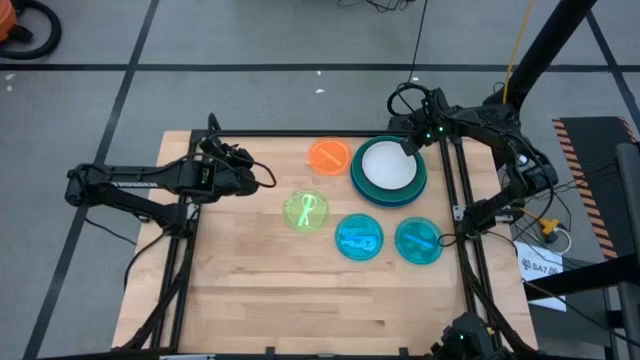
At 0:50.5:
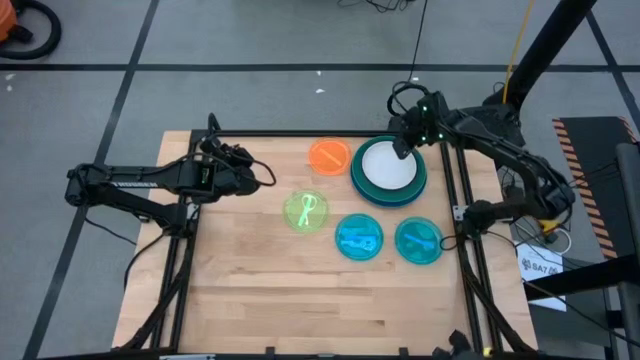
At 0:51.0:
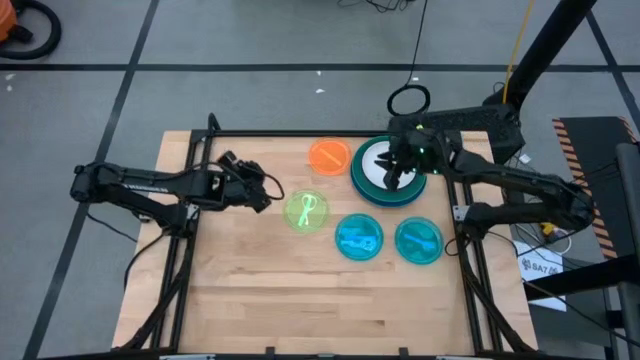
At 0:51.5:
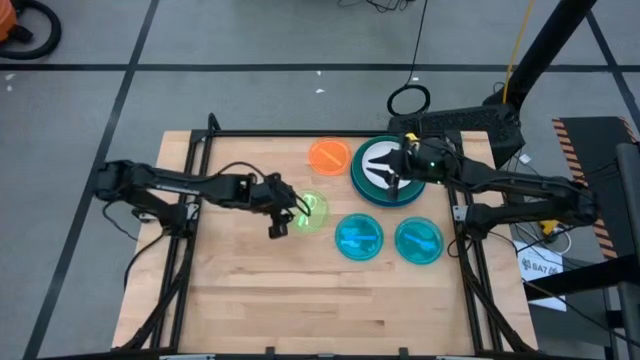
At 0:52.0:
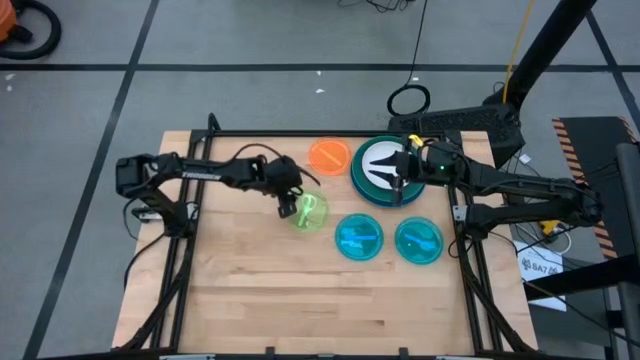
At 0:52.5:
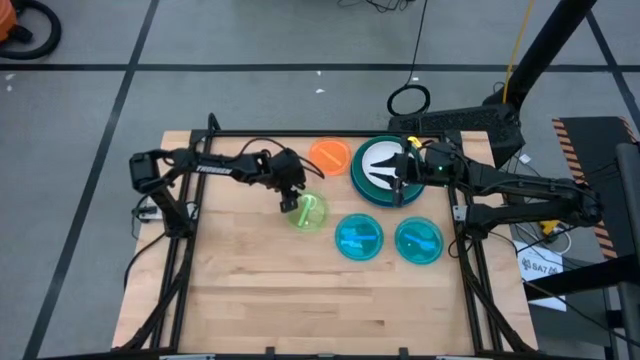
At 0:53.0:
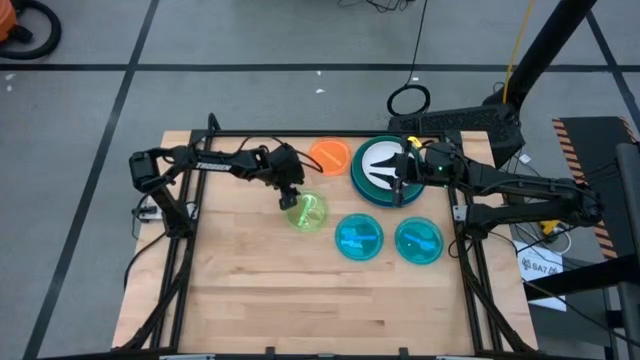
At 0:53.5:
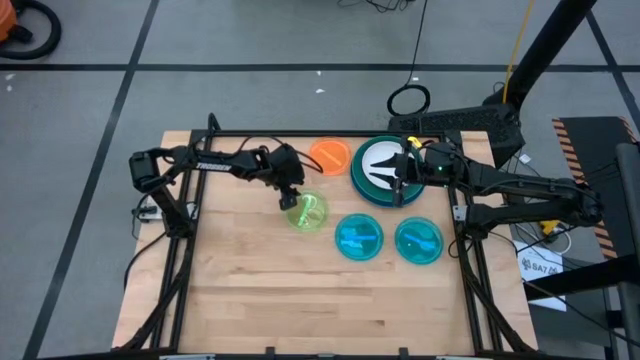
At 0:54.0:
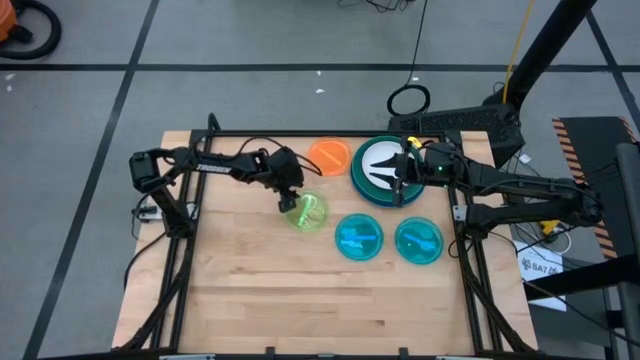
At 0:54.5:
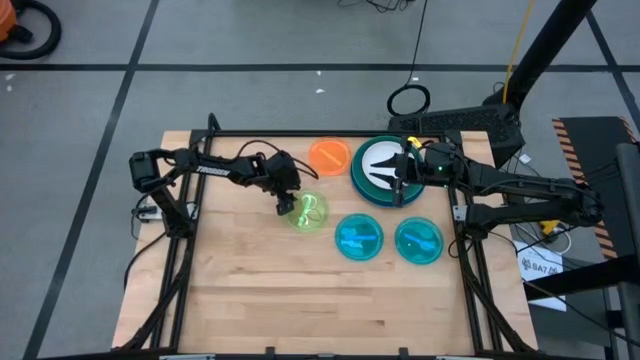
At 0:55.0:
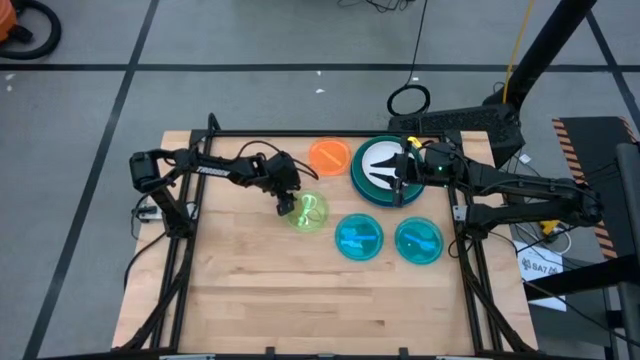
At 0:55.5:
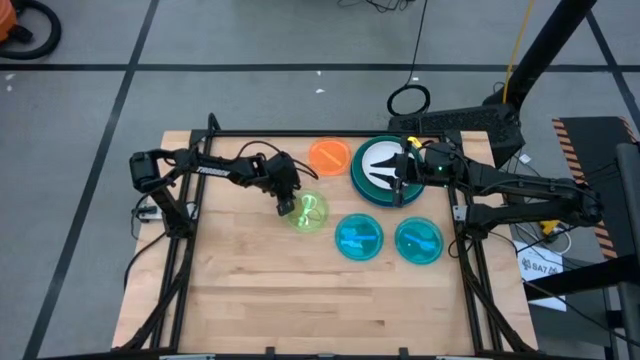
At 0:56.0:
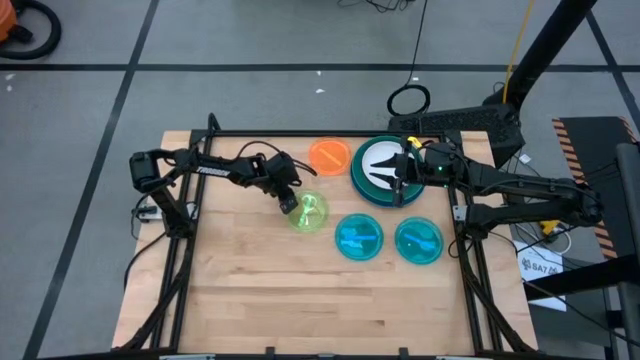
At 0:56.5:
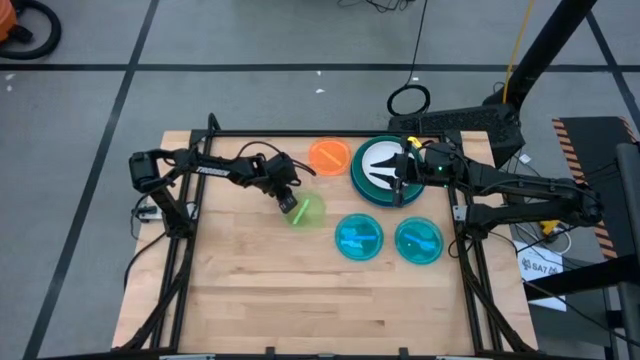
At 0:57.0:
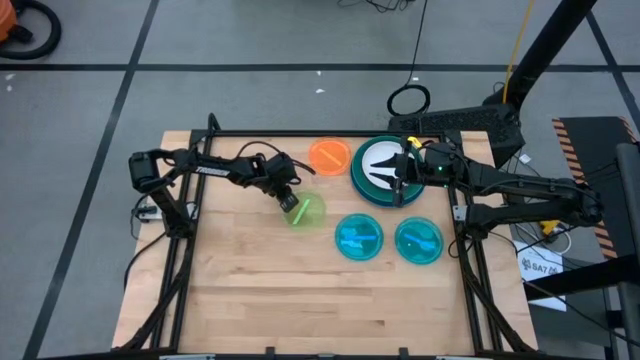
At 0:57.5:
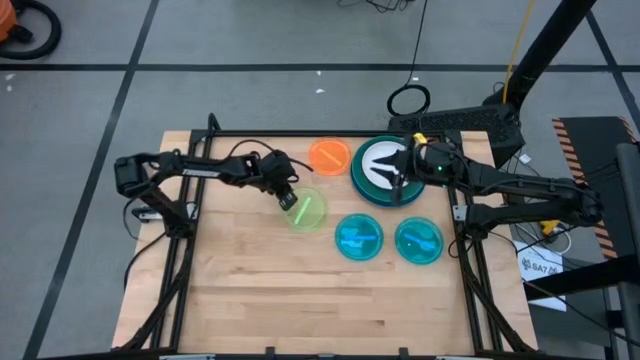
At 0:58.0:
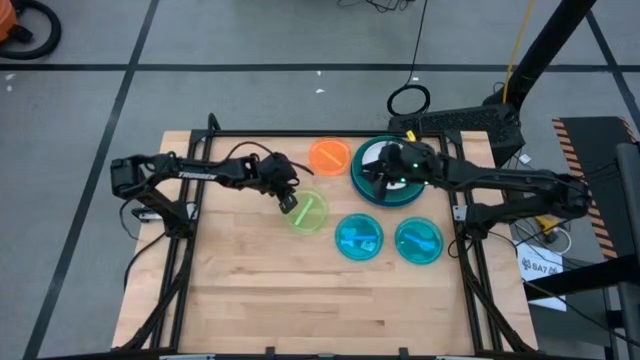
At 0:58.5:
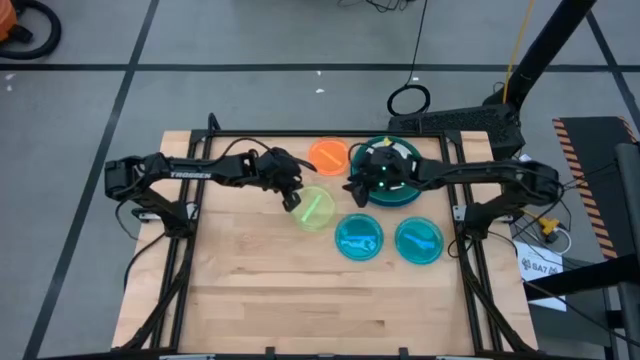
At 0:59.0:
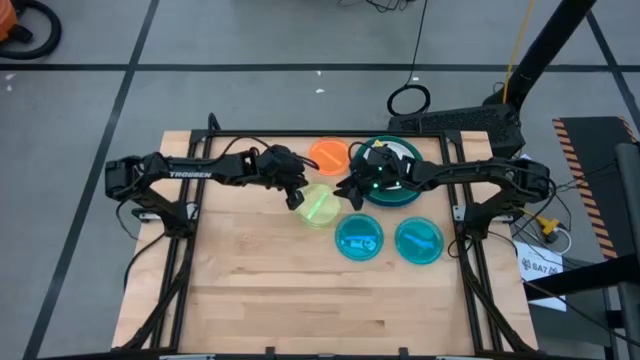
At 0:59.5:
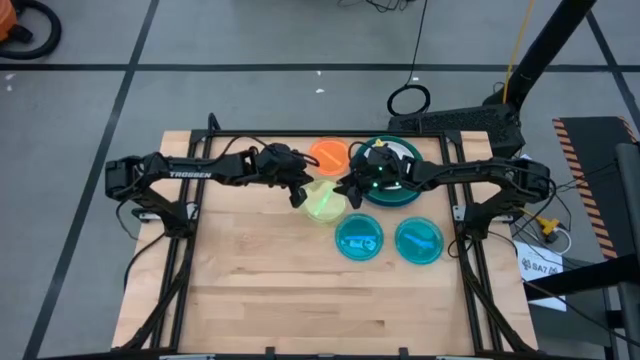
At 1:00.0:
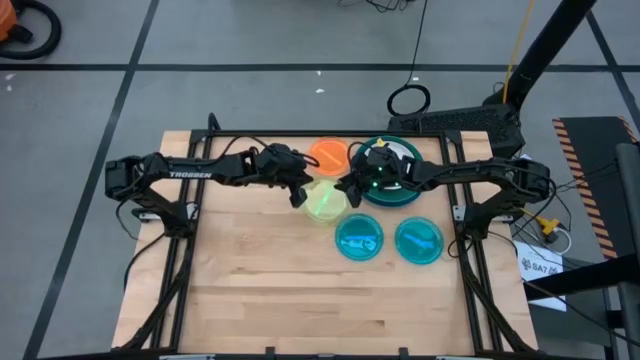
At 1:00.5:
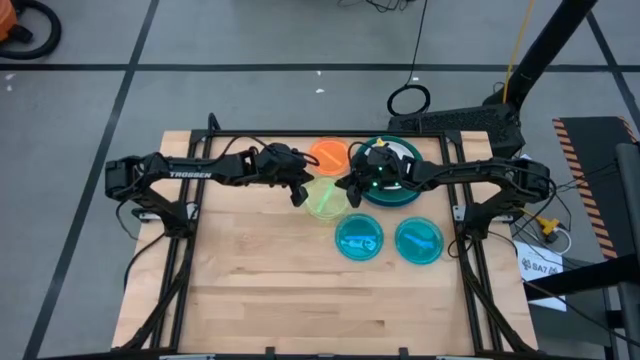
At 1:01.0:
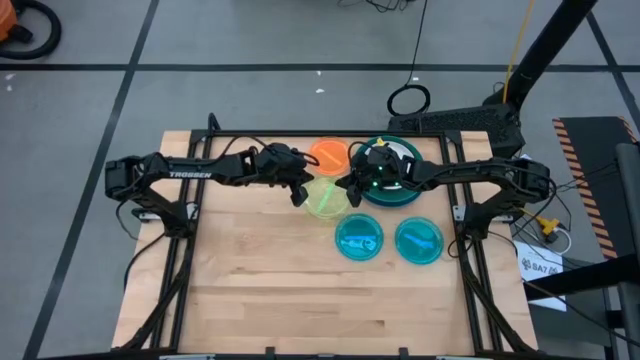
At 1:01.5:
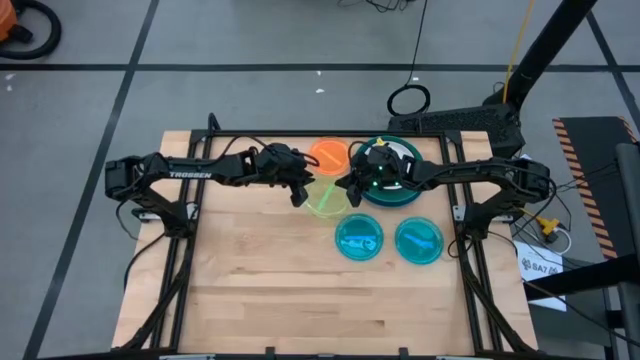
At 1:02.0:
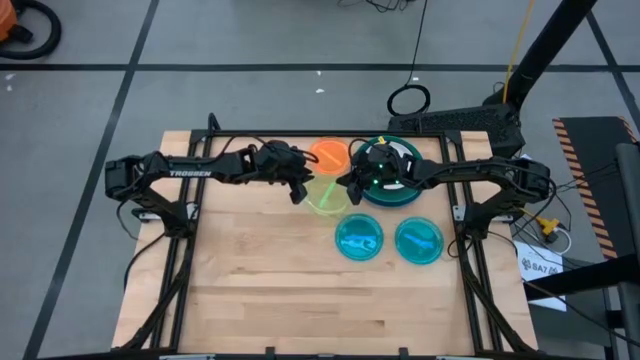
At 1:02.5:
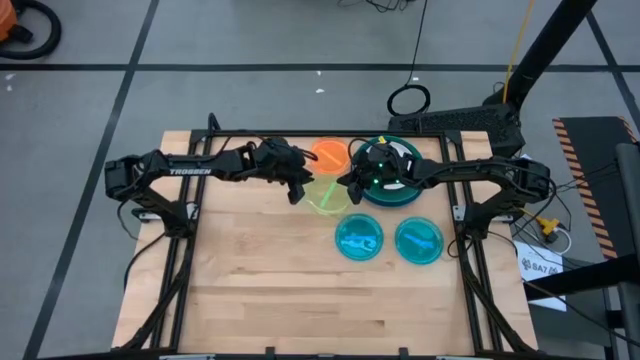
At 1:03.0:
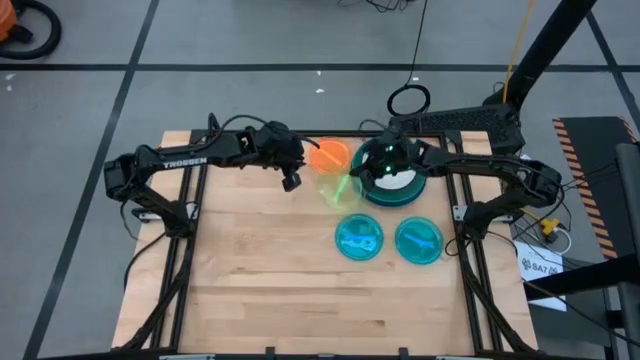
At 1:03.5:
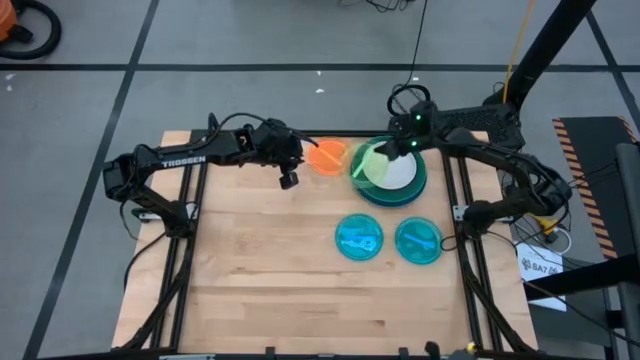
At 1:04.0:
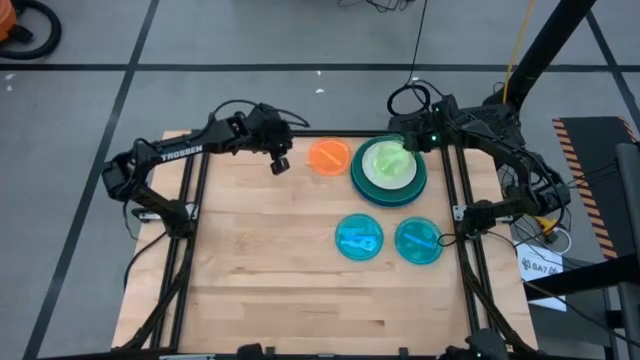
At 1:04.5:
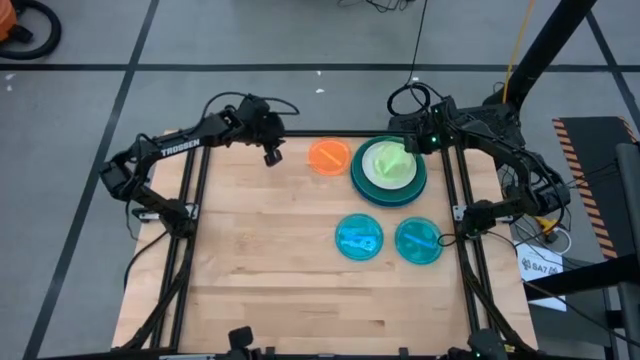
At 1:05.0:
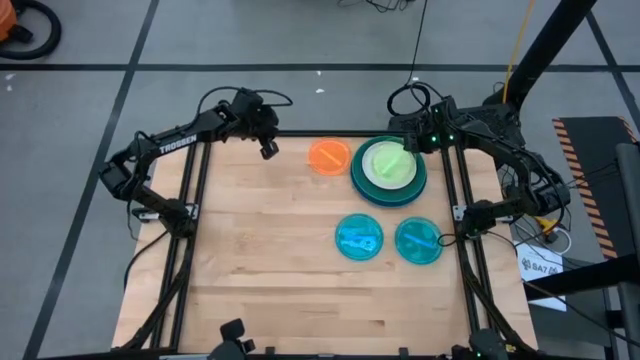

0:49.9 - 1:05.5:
Task: Stack plastic plates
Stack the light green plate on top of the white plate

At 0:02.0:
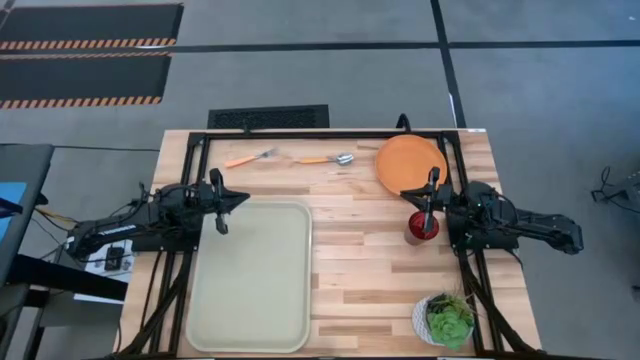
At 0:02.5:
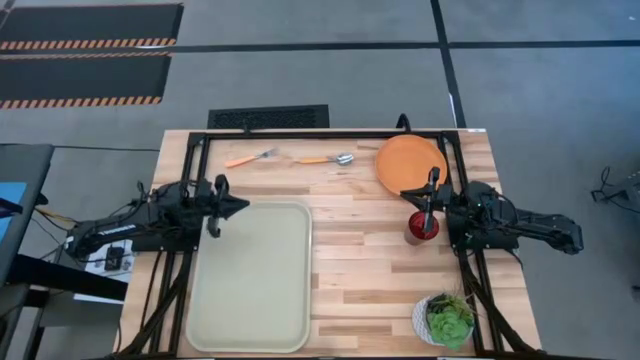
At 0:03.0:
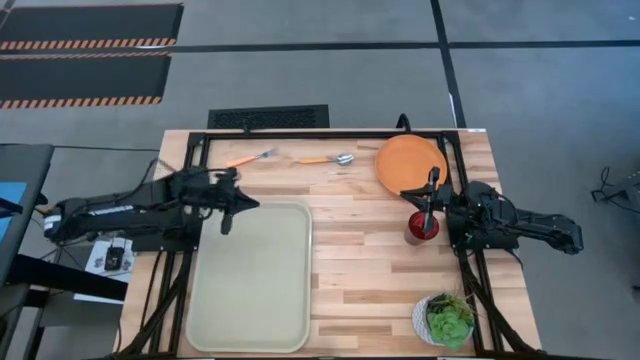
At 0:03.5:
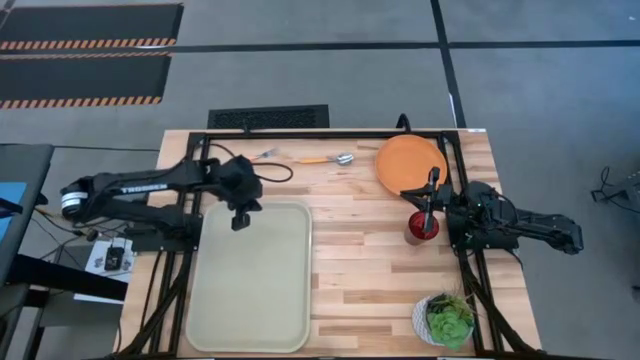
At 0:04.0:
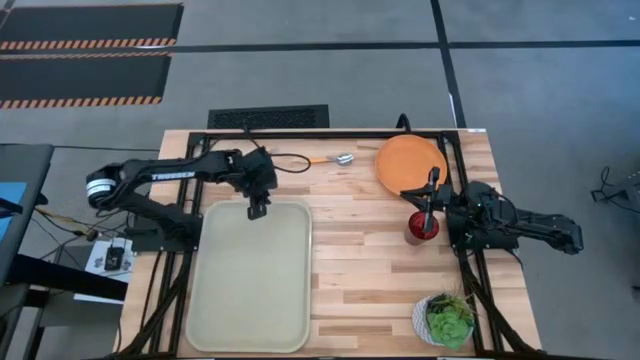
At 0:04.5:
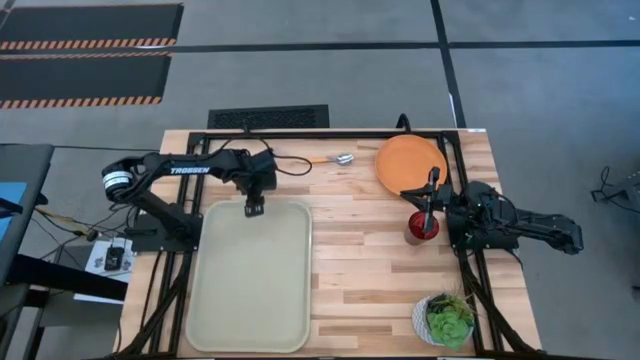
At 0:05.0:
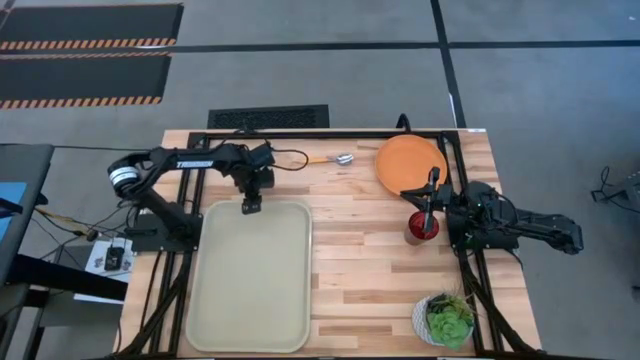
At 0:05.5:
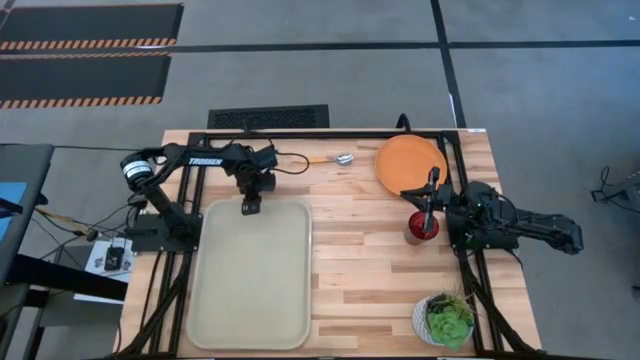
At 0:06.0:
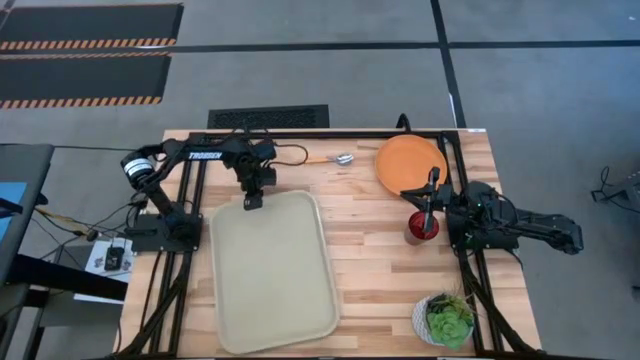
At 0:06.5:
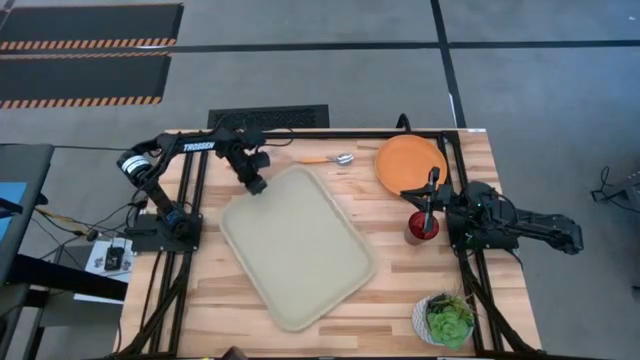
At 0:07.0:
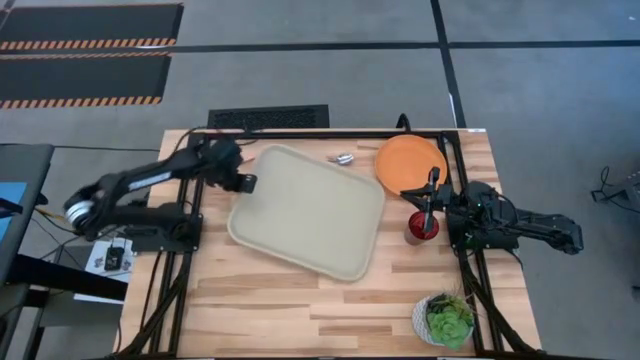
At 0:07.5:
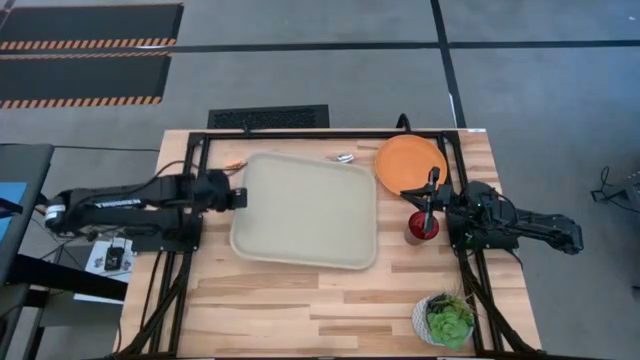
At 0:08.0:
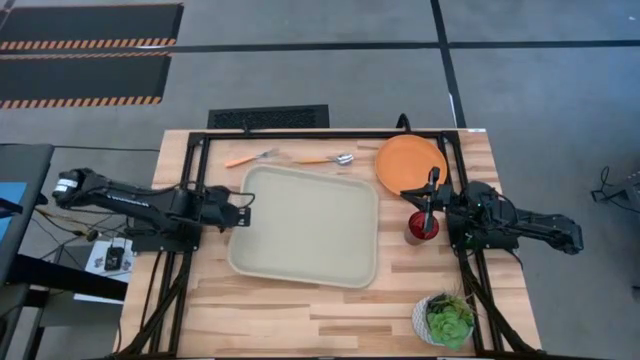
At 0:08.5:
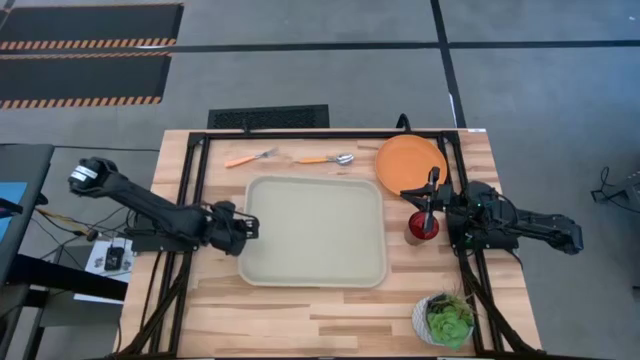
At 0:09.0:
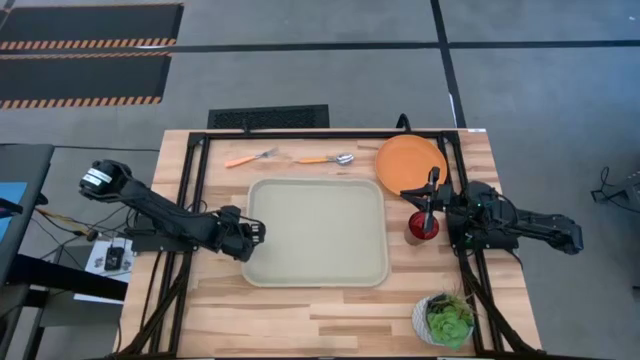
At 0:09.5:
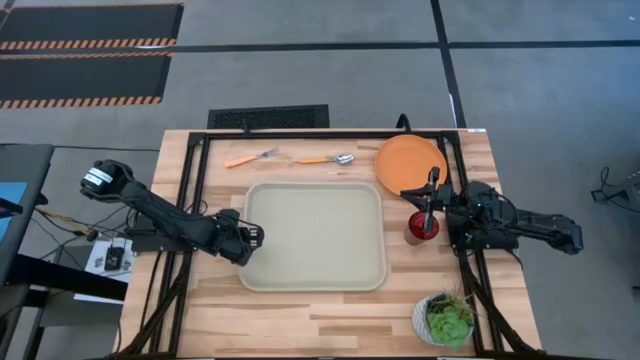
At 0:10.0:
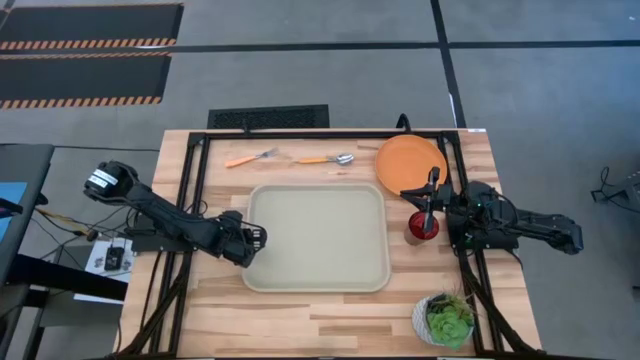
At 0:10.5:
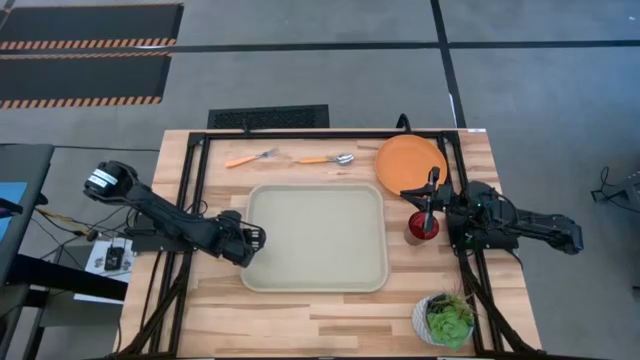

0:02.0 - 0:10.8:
Task: Pick and place plate/cup/fork/spoon on tray
Move the gray serving tray to the center of the table
